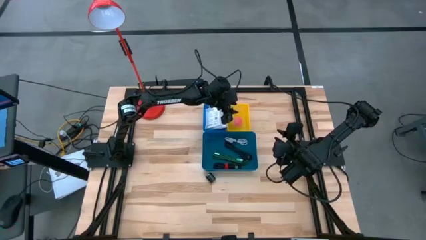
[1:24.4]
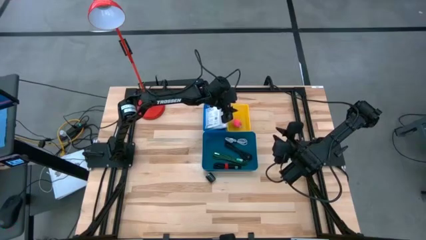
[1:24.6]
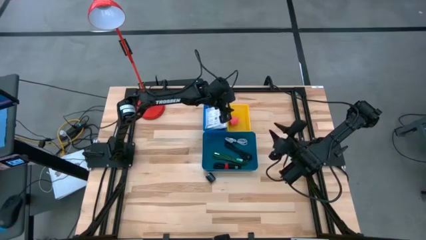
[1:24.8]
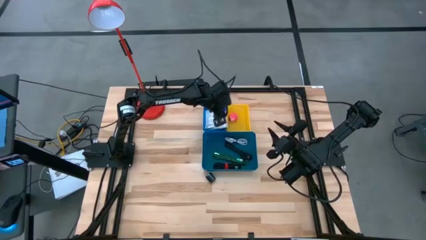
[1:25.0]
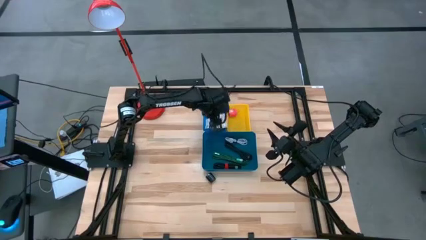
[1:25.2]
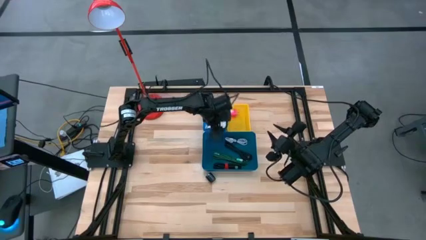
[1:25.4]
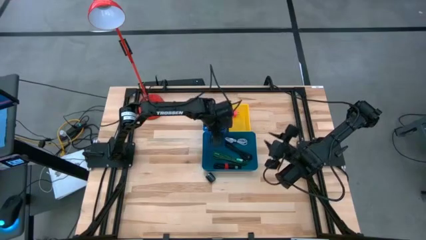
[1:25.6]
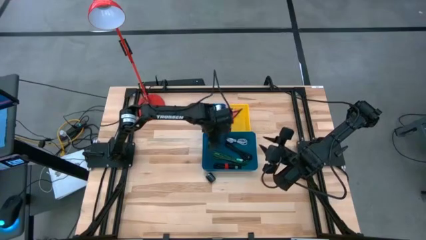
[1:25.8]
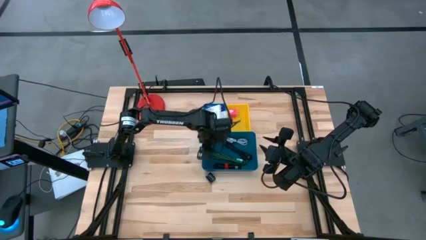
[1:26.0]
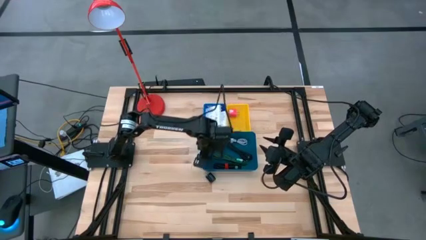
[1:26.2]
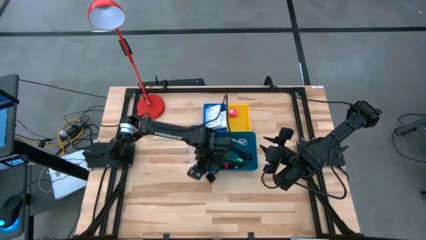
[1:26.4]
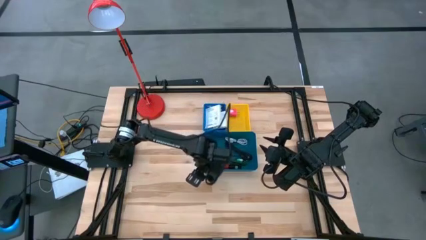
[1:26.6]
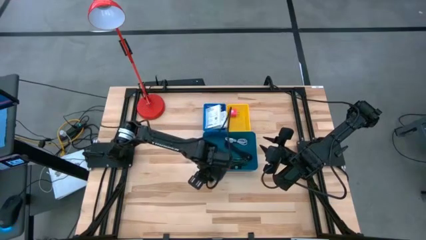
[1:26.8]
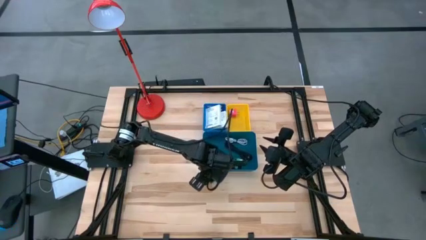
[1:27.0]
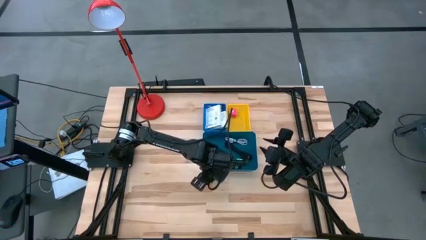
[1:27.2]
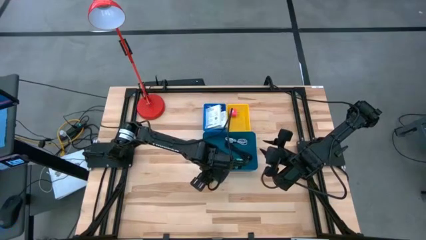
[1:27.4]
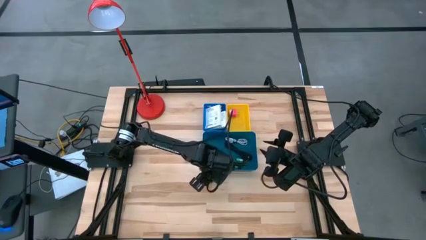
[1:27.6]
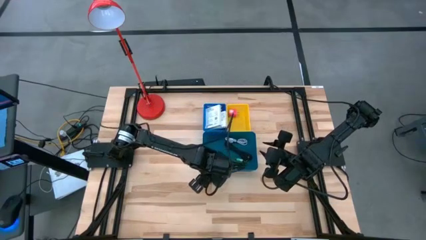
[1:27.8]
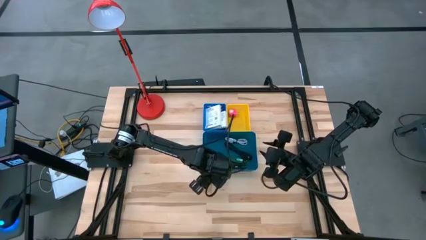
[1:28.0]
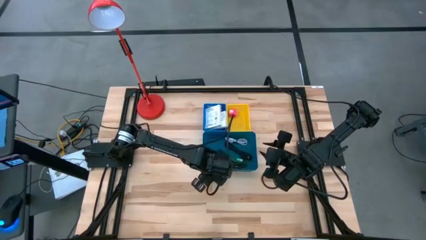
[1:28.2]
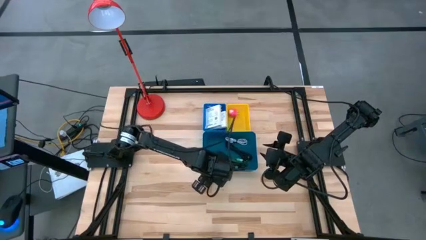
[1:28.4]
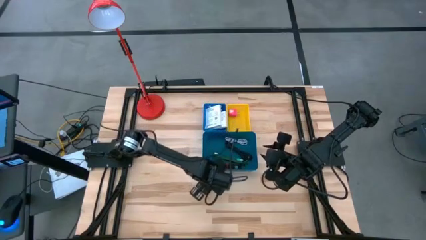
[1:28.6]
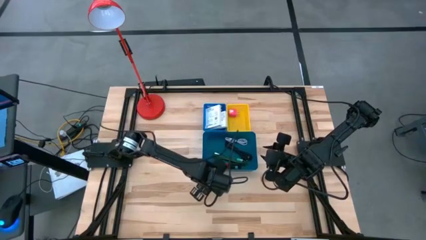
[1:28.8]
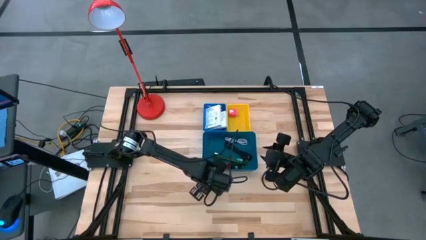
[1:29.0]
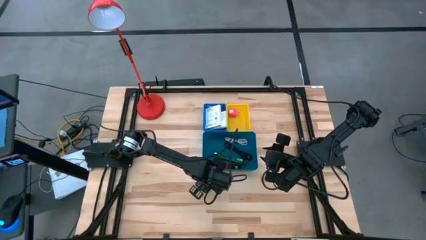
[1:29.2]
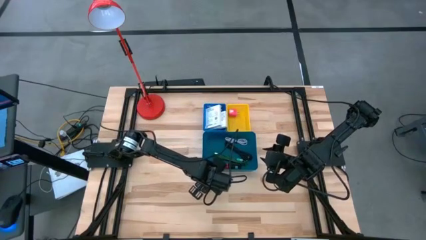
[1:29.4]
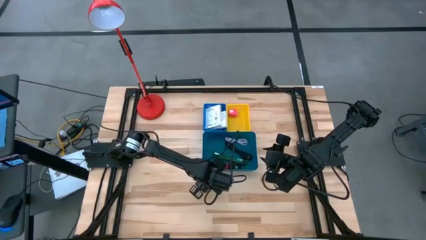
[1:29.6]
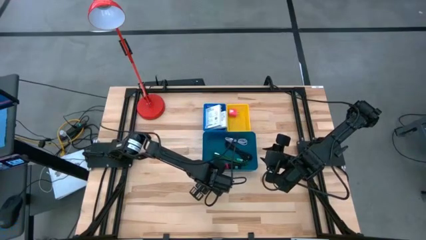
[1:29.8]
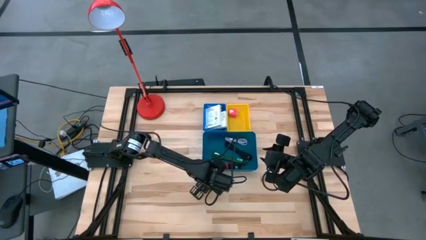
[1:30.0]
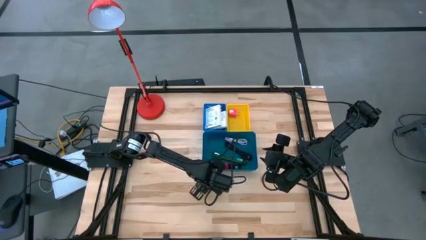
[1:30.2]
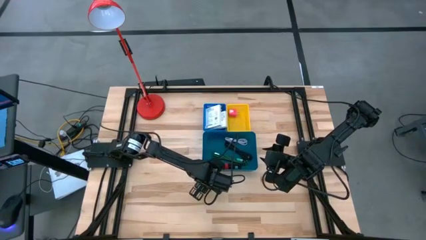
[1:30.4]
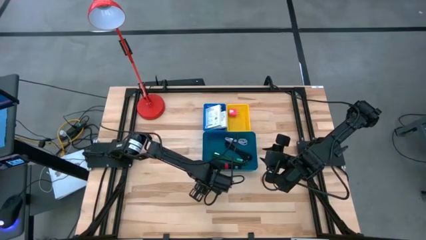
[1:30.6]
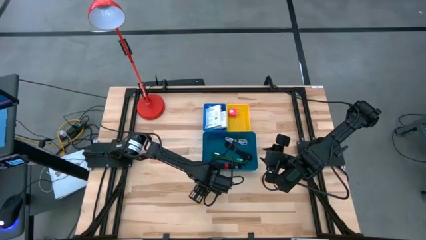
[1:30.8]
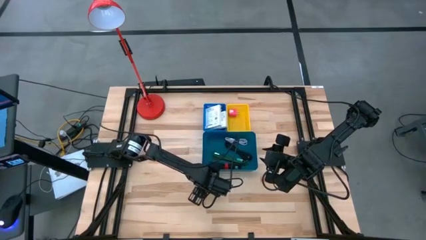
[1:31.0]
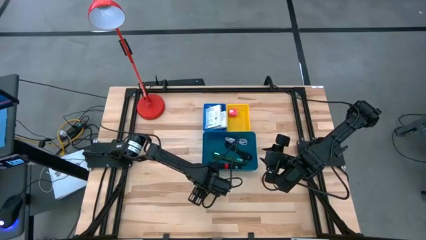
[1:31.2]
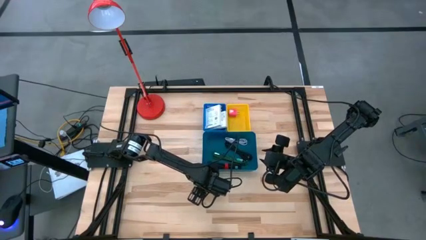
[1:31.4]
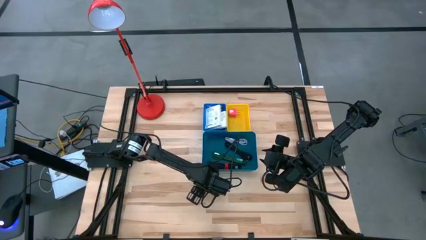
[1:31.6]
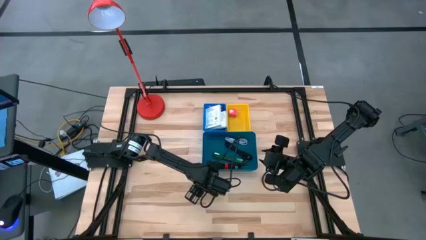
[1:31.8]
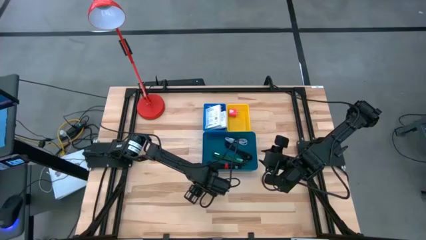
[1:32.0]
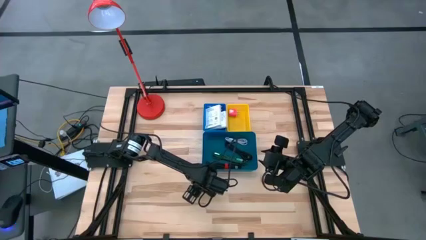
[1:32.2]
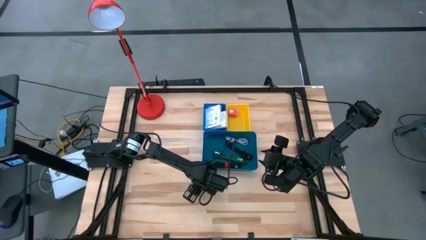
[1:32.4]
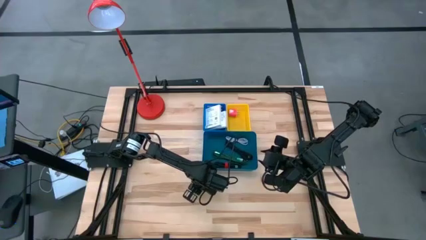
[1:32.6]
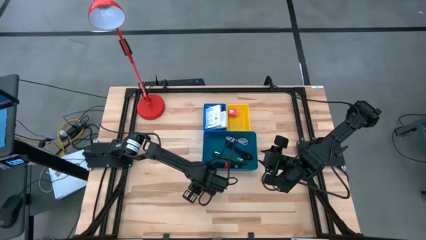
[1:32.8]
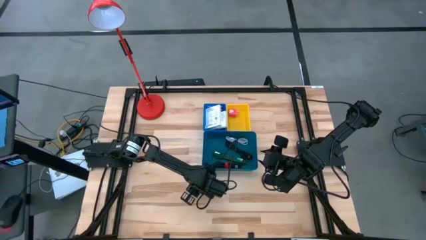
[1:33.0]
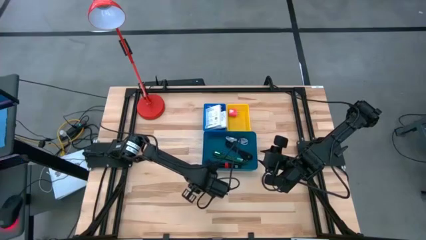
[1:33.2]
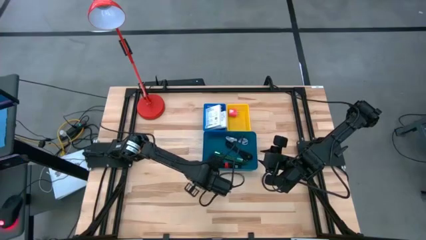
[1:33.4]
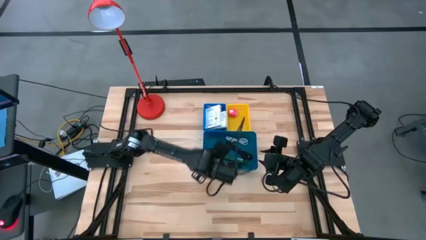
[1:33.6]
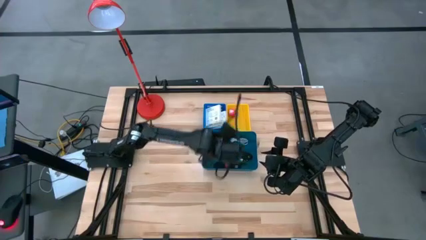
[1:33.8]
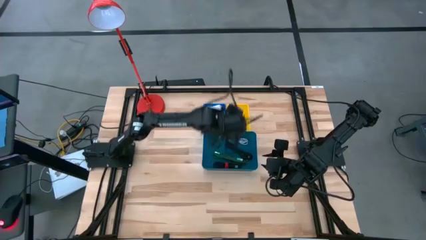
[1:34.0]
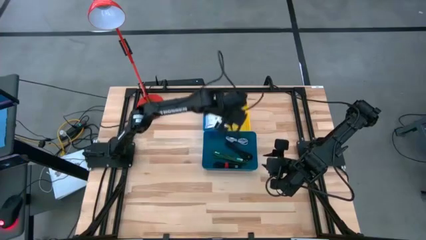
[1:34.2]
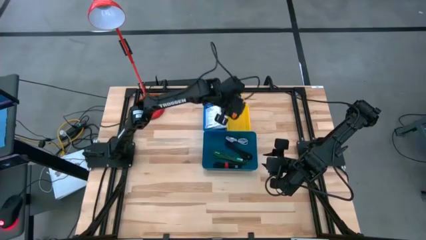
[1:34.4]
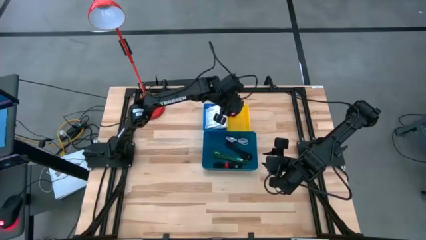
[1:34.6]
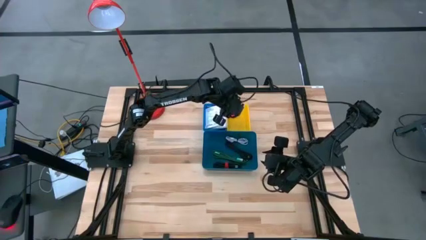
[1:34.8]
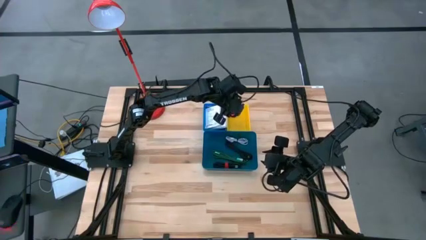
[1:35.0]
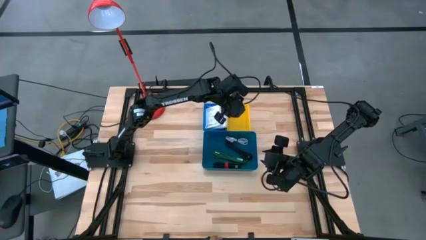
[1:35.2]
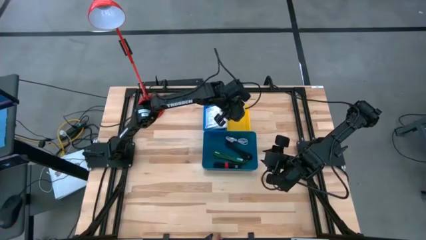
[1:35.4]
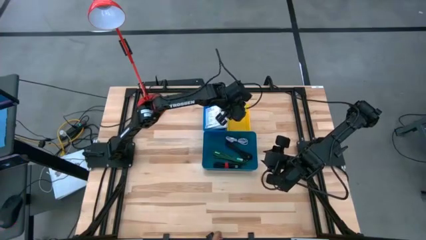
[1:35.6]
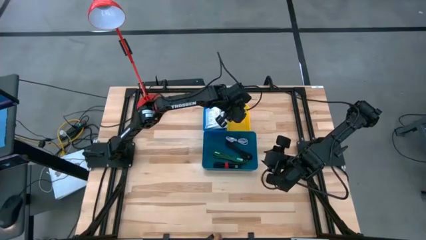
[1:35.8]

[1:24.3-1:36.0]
Task: Pick and place items into bin
Put the black charger adapter into the yellow basket

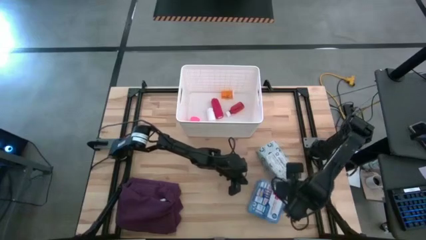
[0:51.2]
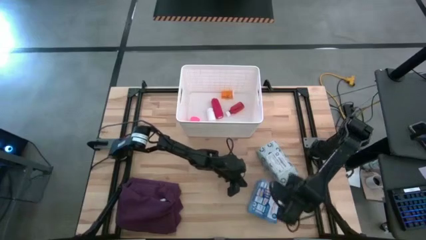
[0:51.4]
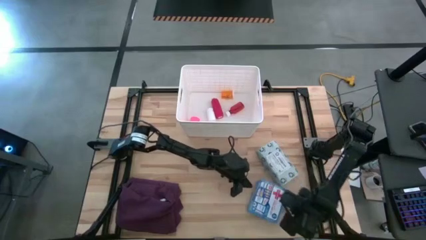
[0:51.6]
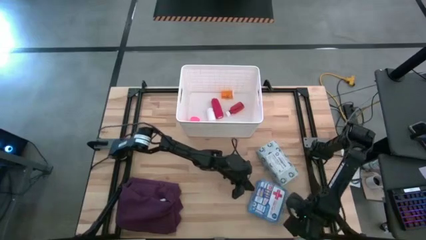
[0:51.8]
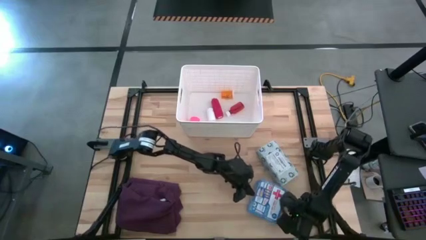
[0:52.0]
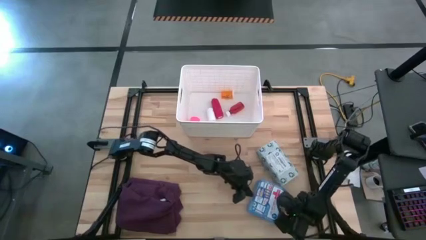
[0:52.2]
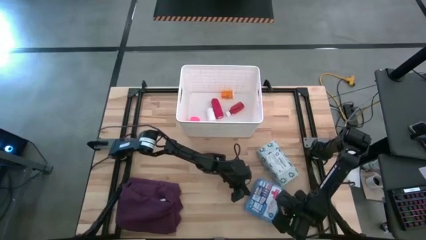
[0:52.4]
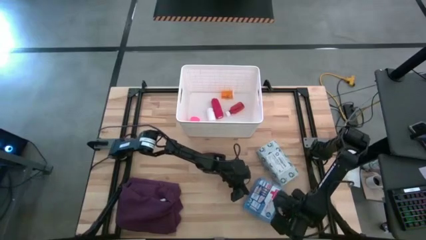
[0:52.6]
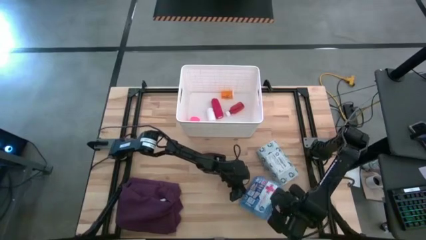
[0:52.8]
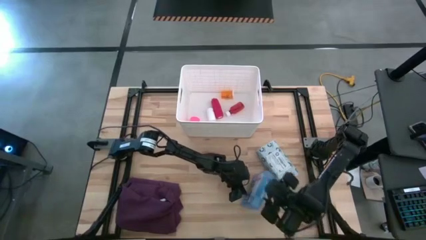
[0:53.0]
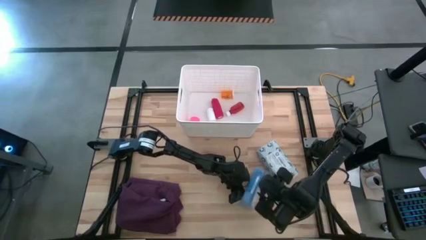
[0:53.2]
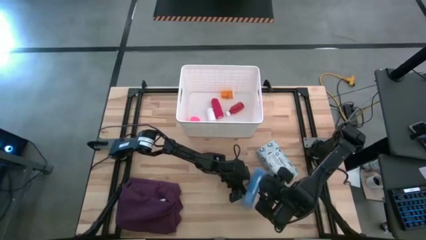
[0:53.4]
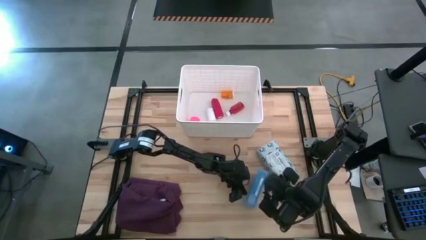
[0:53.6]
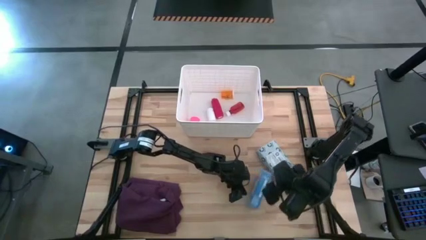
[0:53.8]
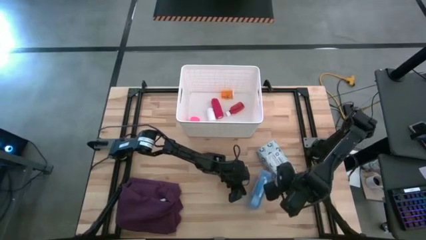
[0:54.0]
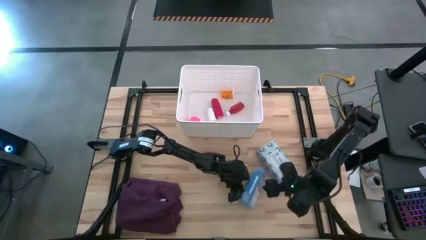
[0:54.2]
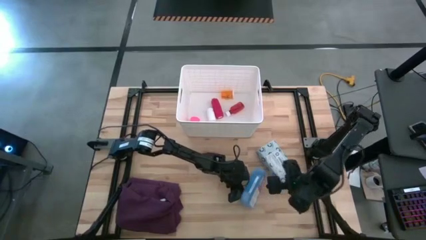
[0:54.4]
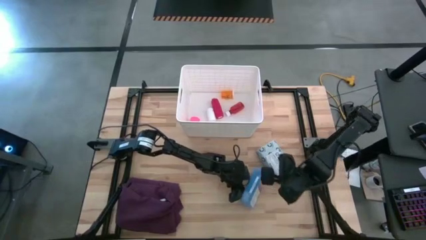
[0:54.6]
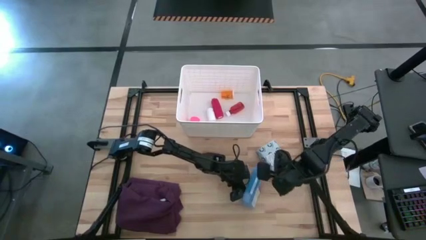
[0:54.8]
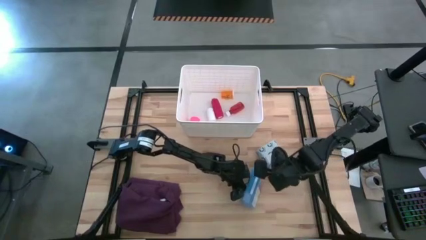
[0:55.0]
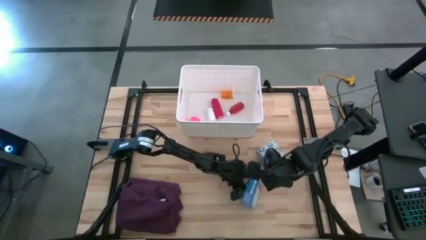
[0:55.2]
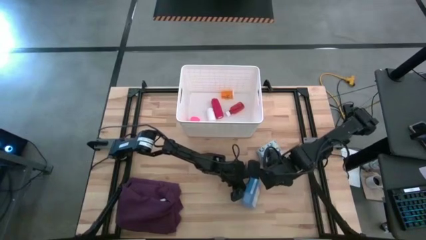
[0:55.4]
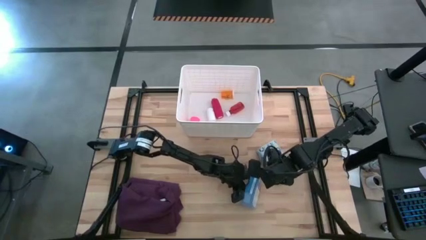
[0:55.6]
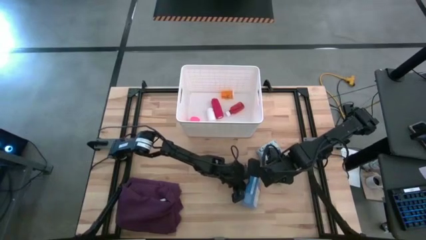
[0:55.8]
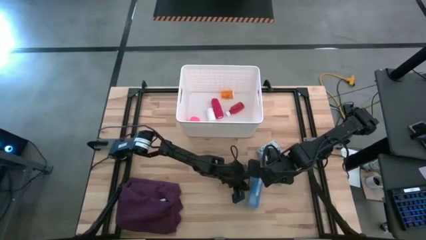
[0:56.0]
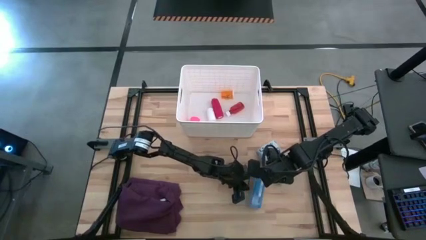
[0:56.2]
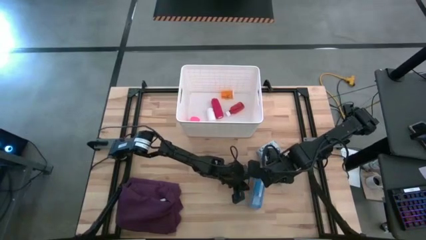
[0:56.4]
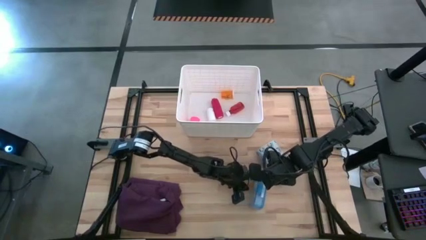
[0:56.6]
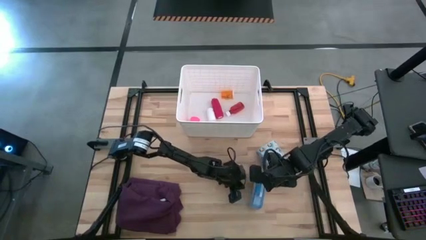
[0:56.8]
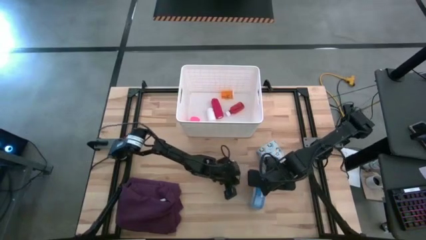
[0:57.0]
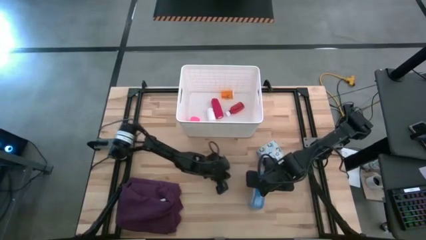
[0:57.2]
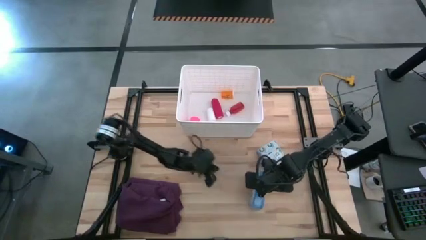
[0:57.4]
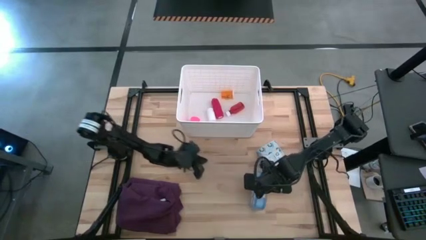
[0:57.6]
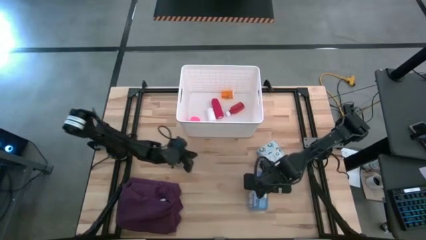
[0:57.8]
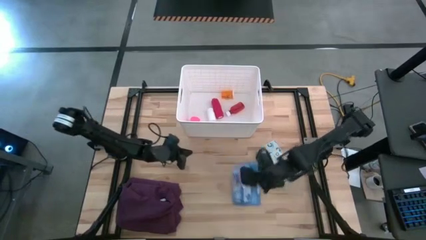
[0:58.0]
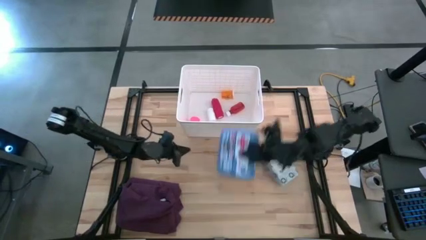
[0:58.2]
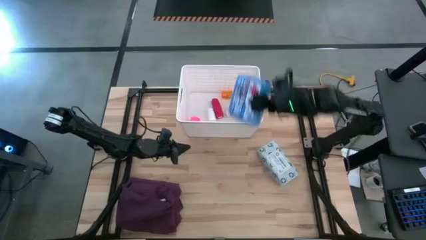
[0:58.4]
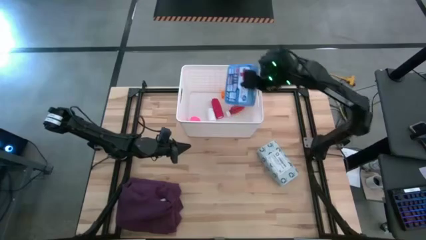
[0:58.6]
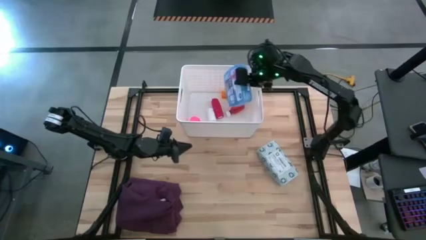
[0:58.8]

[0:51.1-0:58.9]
Task: Pick & place medical supplies in basket/bin
Put the blue first aid kit box into the white bin
